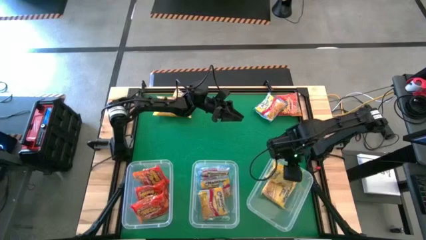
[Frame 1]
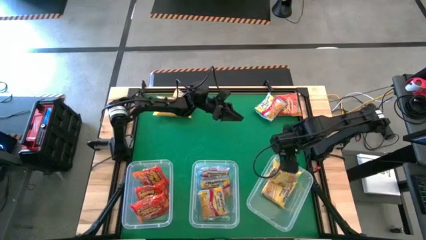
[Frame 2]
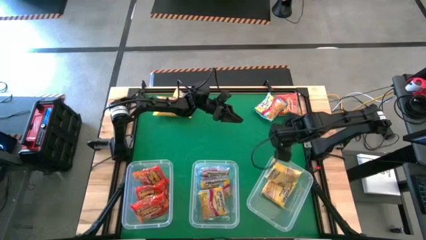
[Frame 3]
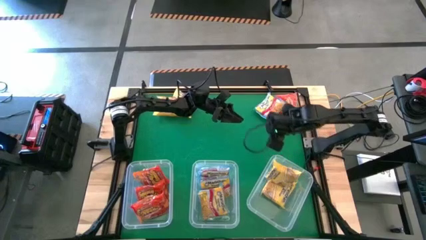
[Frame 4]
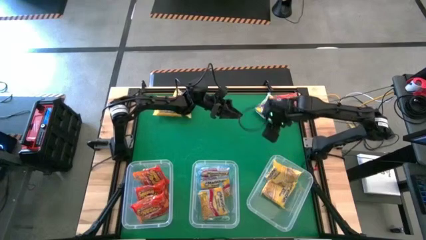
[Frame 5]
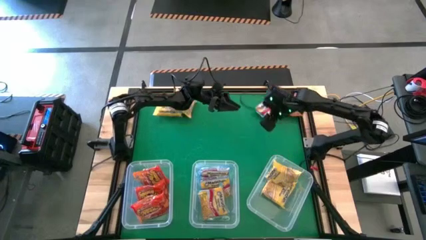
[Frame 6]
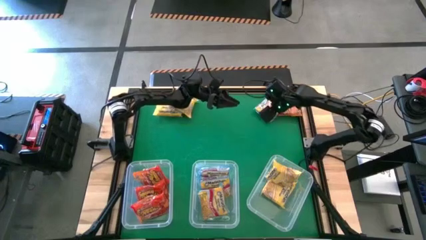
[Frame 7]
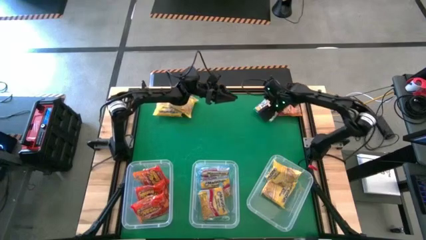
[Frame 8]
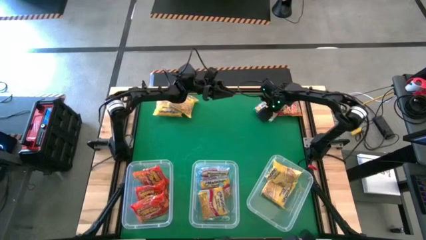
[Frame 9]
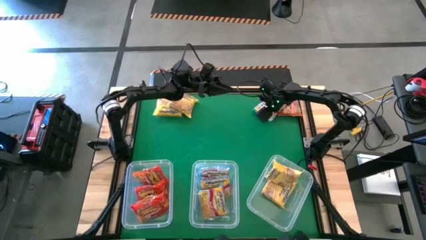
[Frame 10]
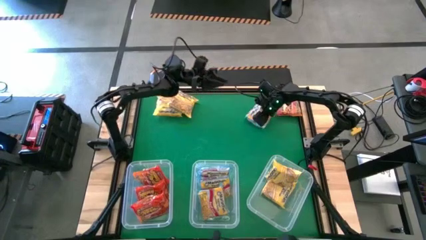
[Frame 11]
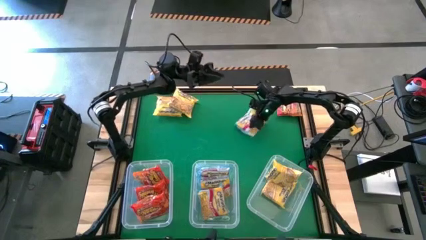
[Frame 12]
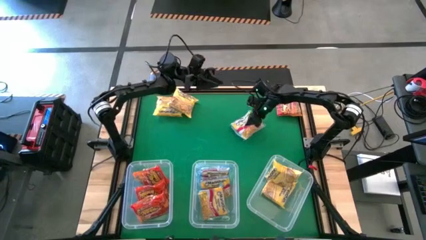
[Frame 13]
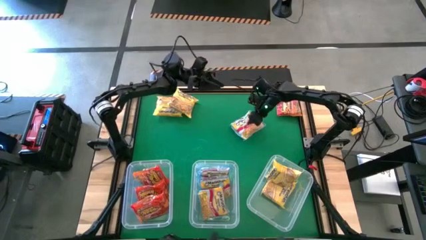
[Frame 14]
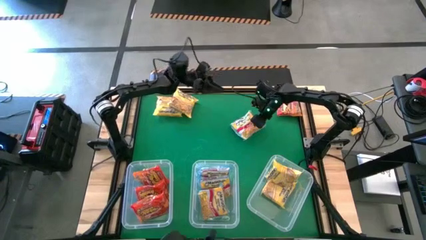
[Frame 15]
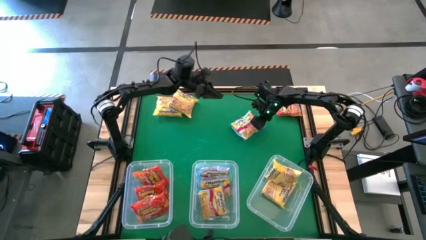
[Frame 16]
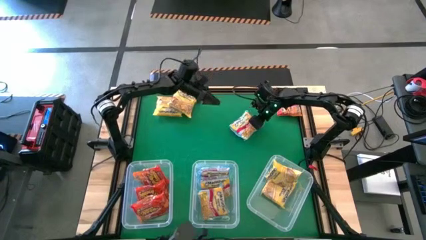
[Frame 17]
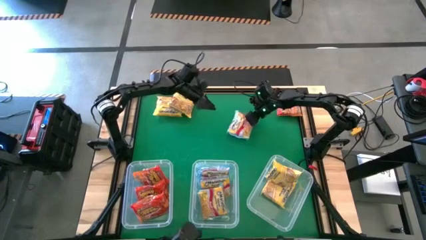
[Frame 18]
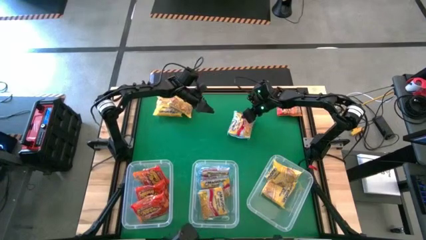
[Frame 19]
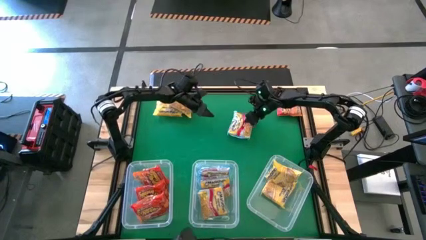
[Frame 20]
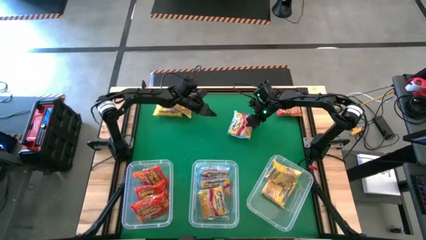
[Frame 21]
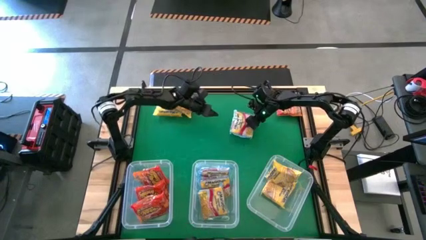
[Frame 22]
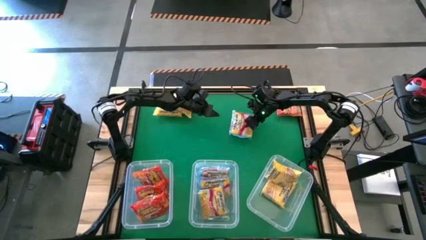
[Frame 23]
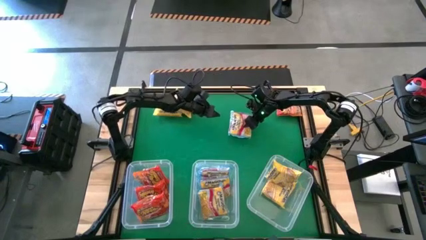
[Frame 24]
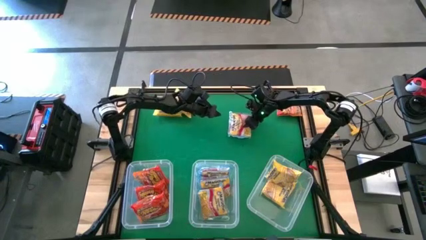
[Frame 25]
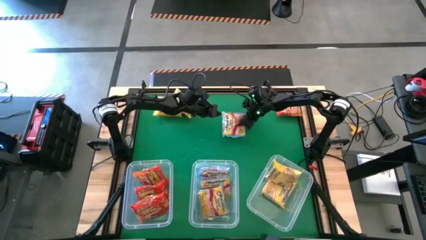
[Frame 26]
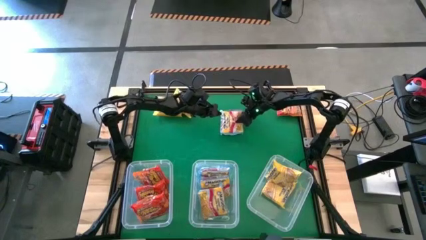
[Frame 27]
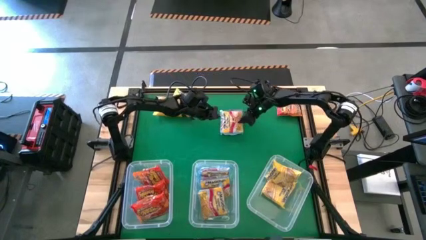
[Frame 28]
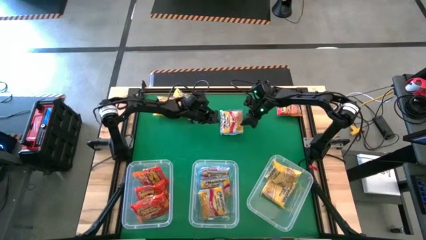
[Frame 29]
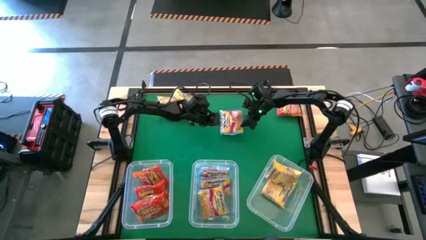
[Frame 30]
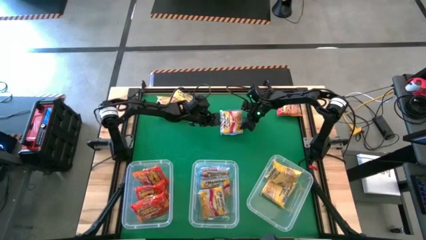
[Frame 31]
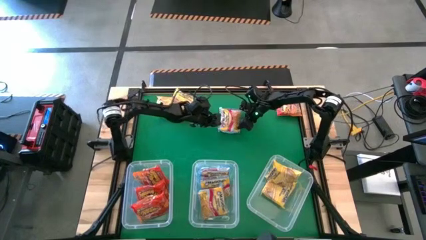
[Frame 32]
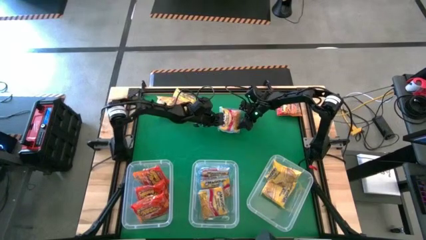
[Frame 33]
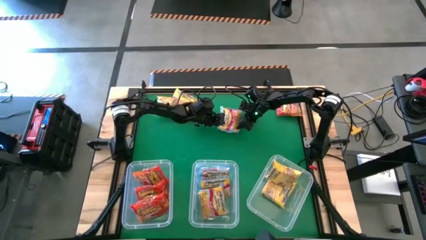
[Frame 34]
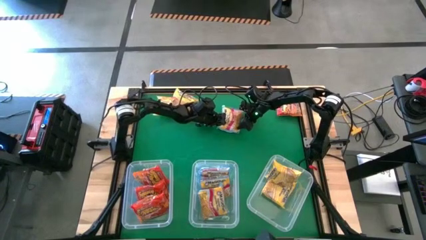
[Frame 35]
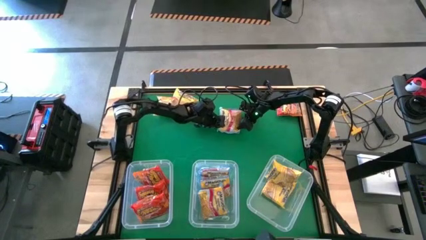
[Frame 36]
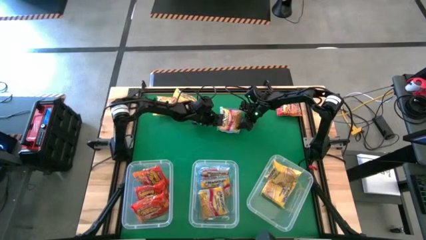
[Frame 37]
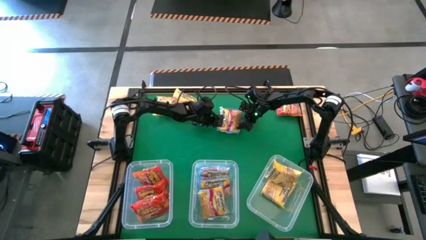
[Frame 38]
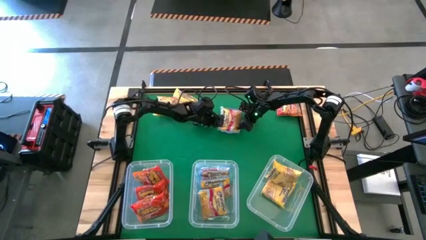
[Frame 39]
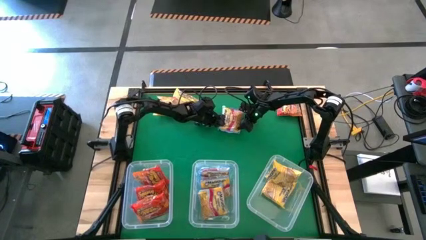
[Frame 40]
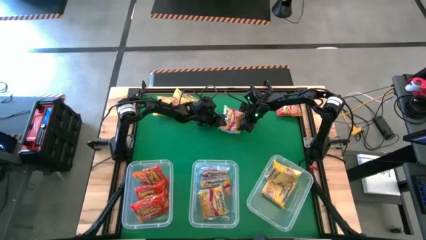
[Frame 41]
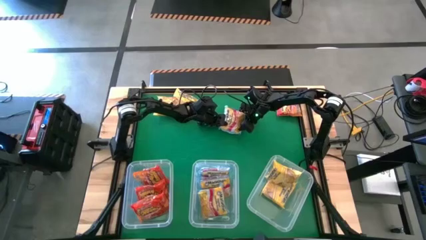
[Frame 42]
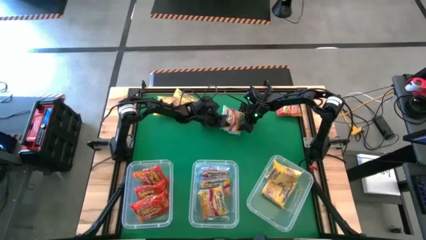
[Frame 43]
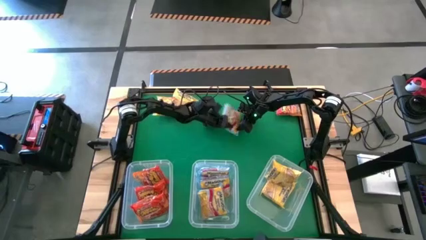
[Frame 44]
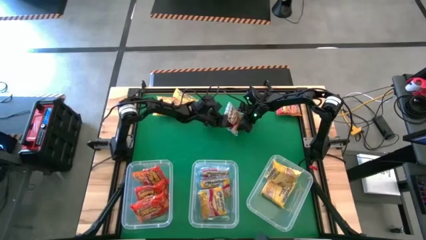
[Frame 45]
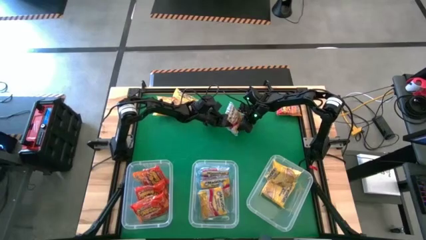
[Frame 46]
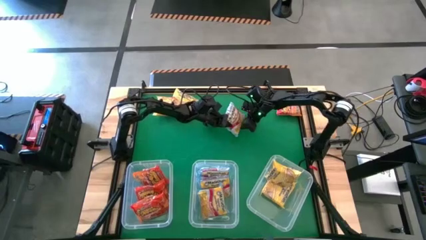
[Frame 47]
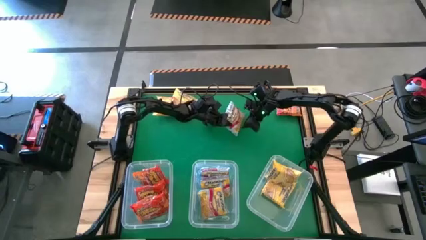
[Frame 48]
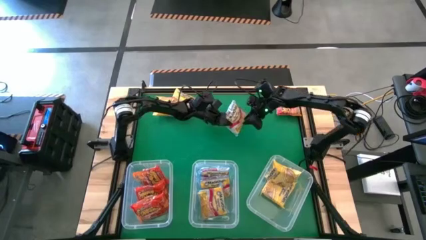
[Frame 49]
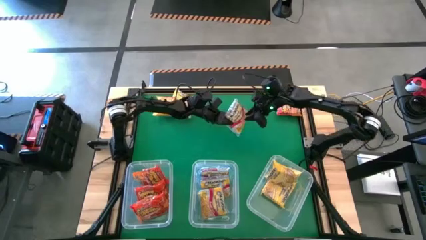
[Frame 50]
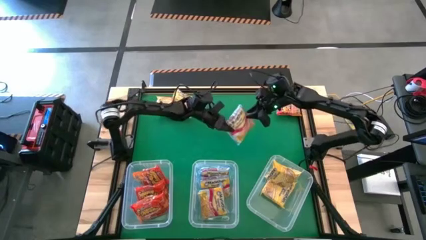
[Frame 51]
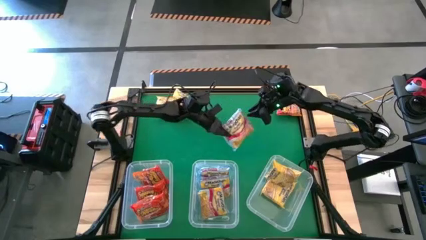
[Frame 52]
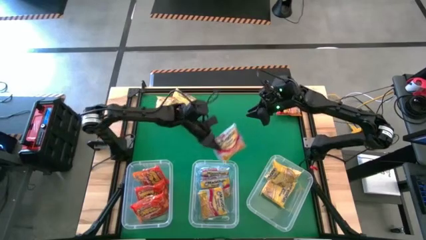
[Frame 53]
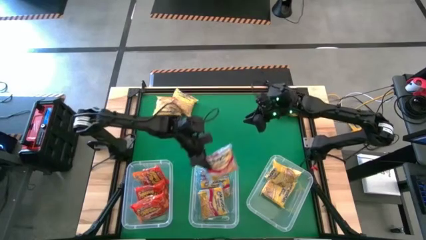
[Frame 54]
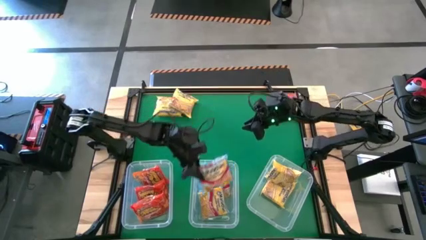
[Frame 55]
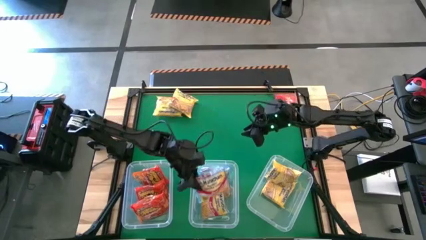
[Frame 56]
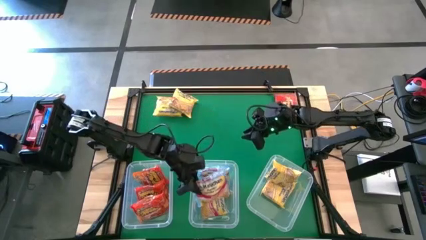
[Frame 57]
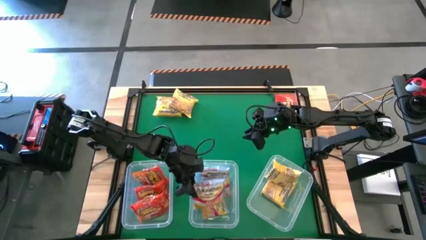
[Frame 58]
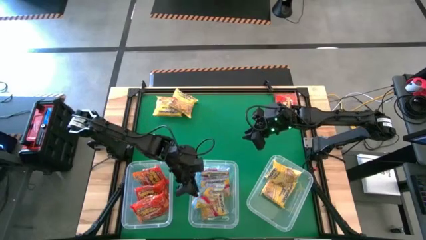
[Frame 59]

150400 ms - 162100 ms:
Task: Sort Maruchan noodles
Put the blue noodle pack into the middle transparent bin
